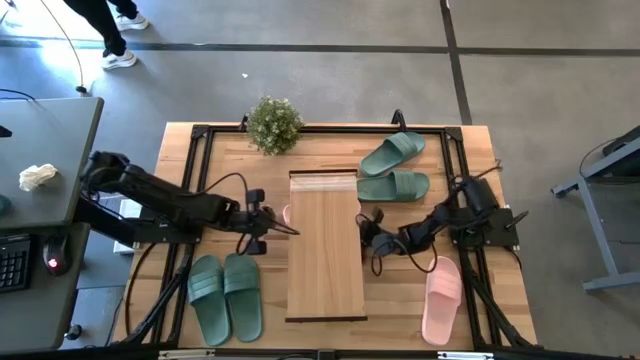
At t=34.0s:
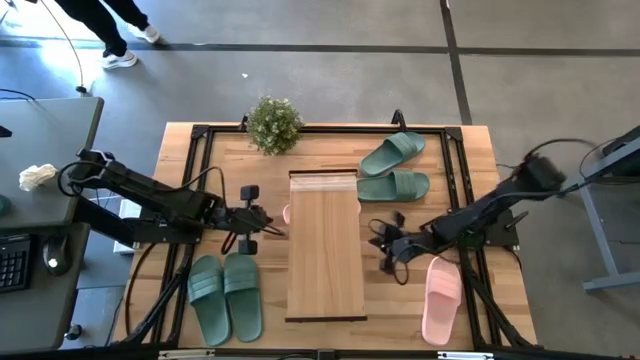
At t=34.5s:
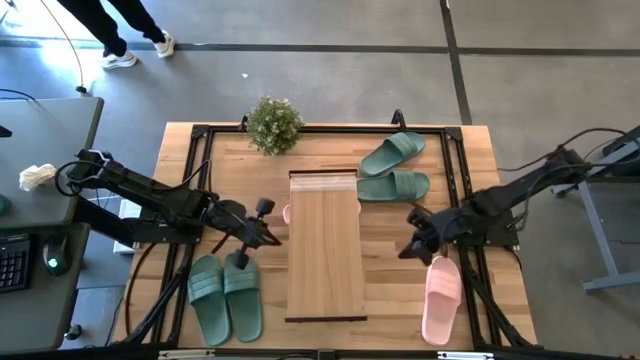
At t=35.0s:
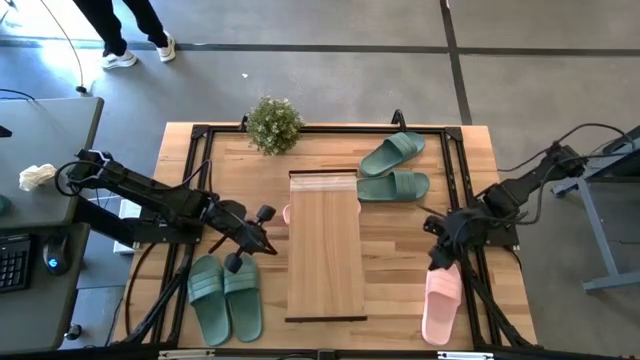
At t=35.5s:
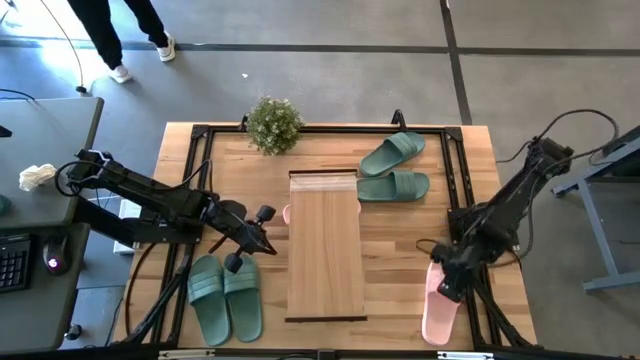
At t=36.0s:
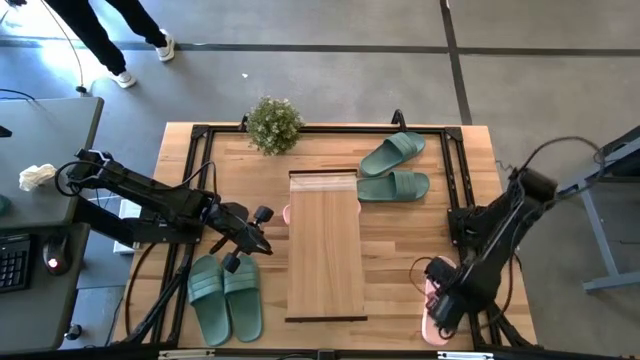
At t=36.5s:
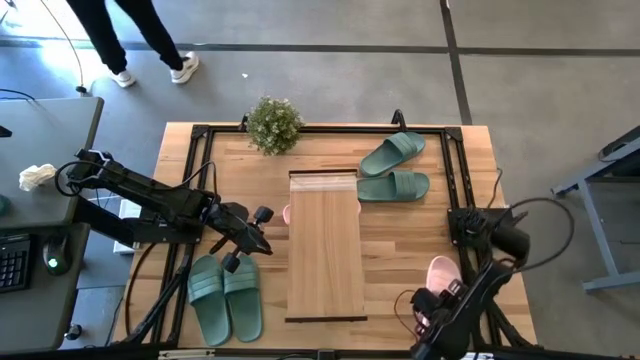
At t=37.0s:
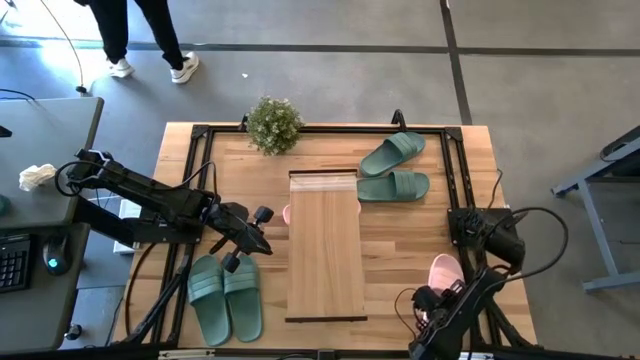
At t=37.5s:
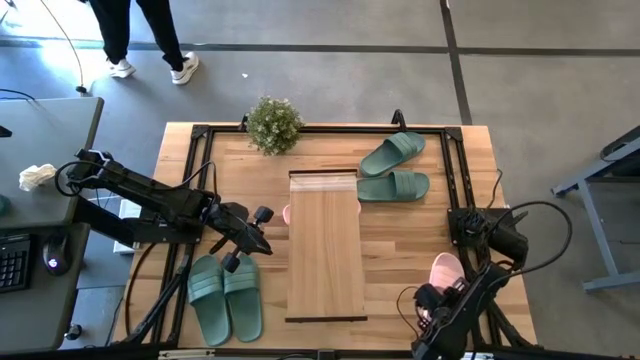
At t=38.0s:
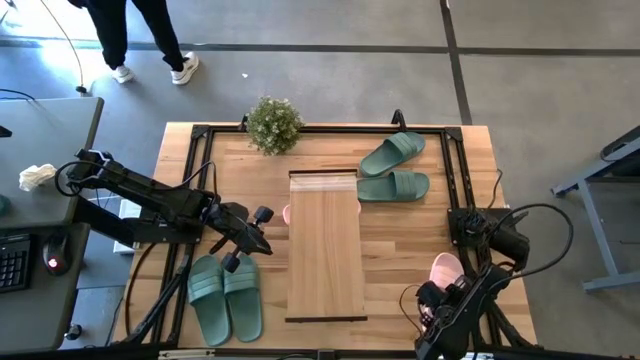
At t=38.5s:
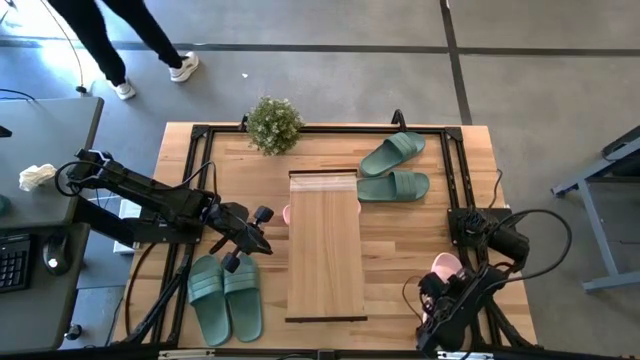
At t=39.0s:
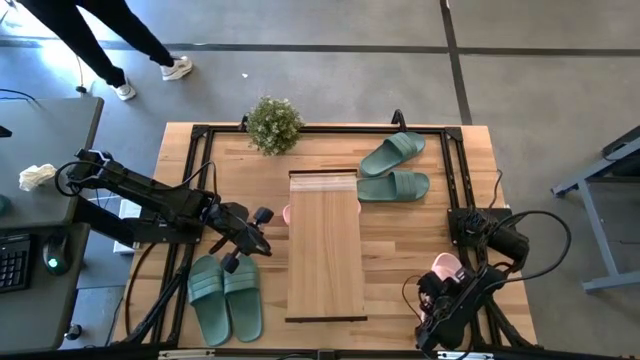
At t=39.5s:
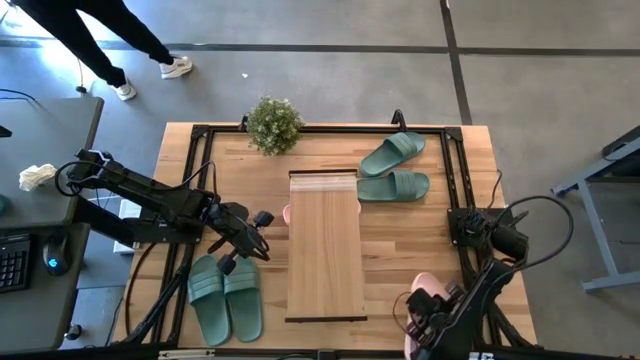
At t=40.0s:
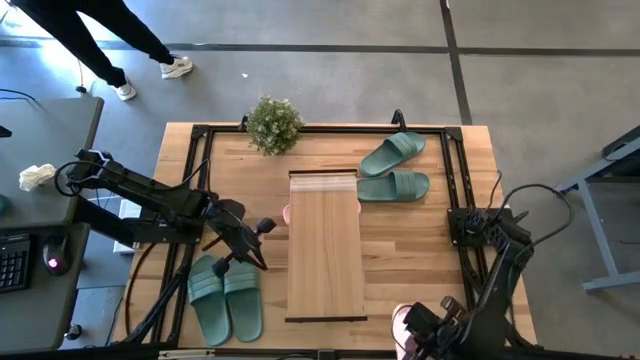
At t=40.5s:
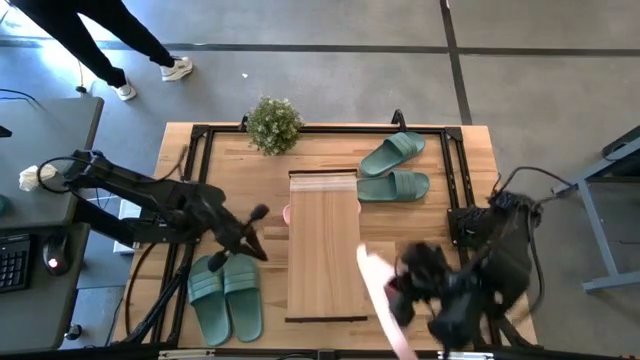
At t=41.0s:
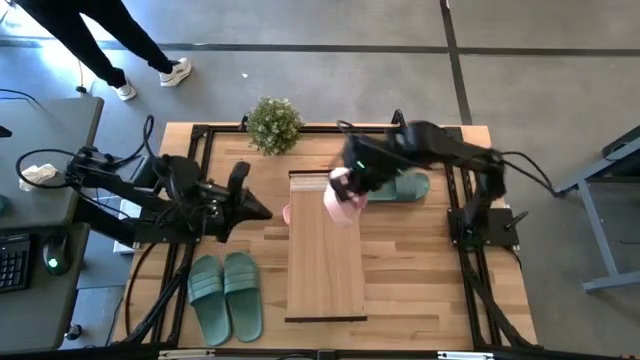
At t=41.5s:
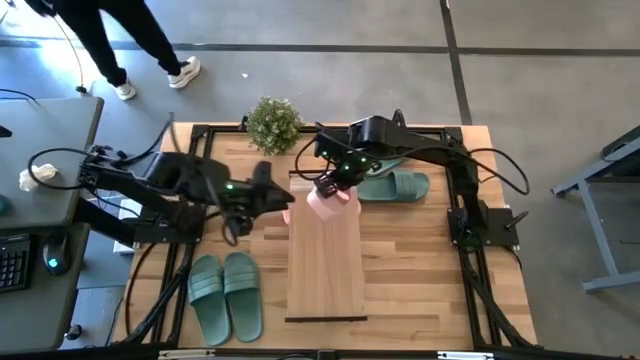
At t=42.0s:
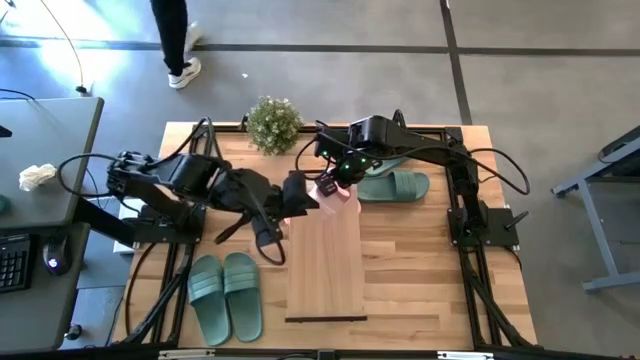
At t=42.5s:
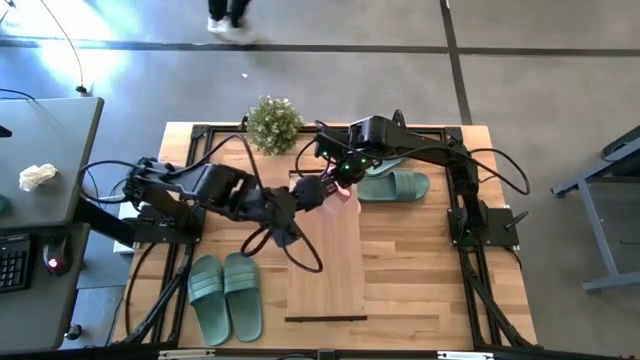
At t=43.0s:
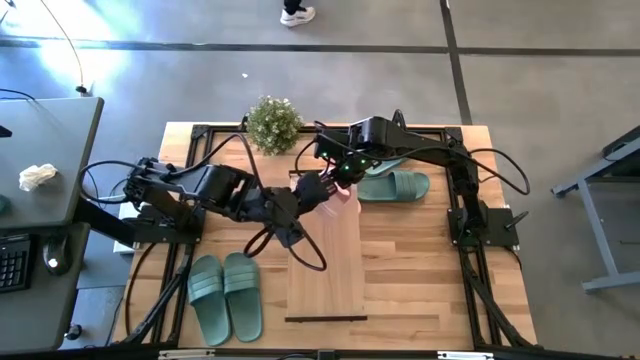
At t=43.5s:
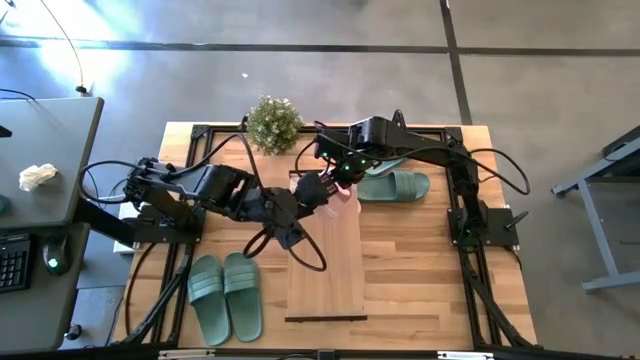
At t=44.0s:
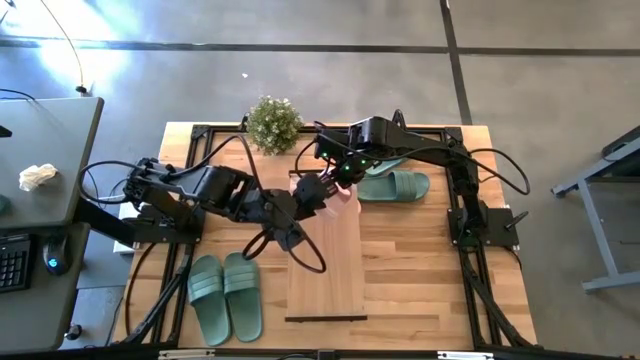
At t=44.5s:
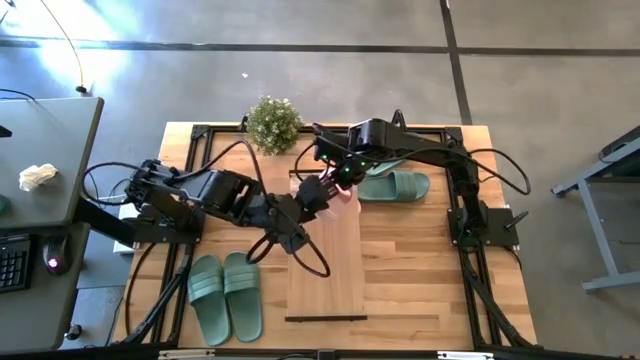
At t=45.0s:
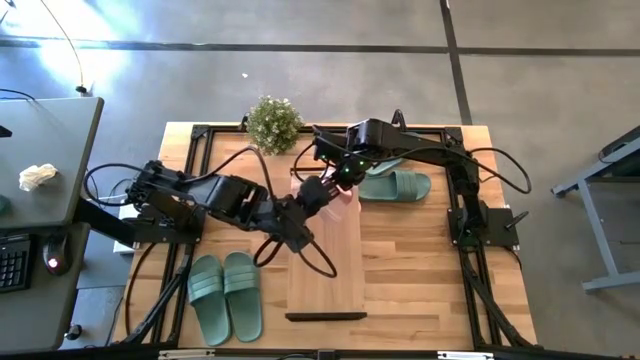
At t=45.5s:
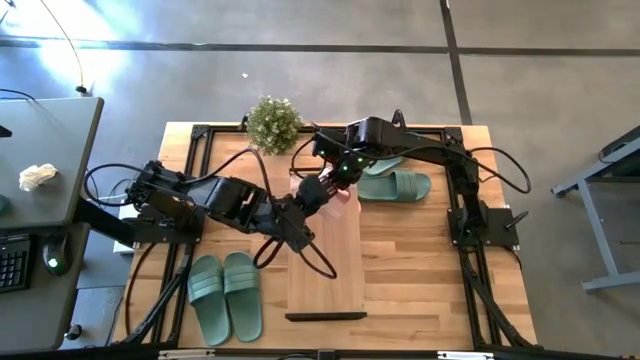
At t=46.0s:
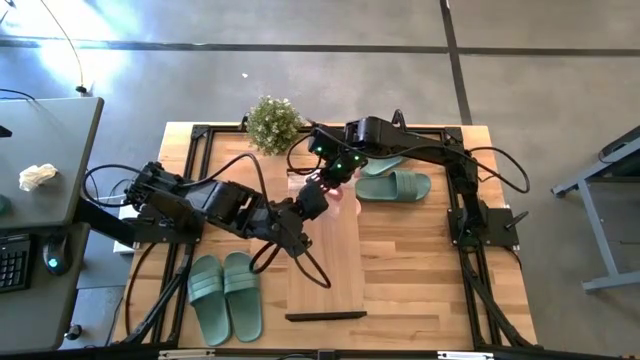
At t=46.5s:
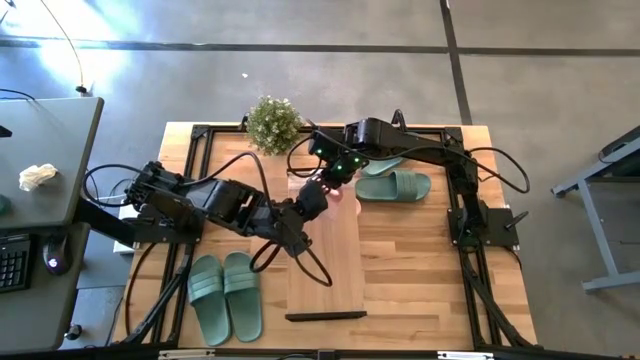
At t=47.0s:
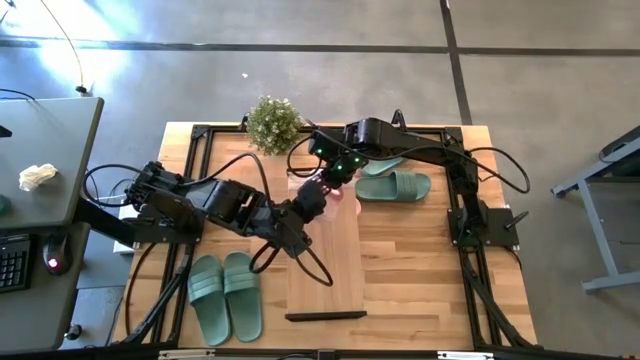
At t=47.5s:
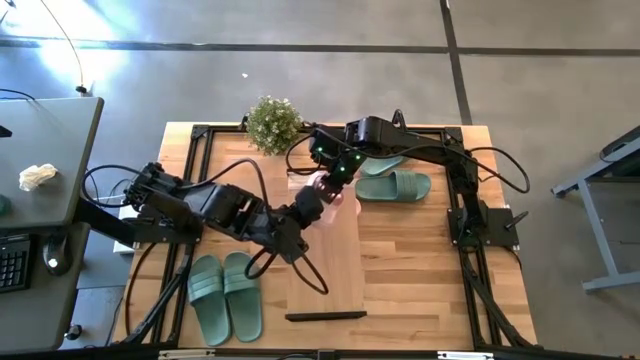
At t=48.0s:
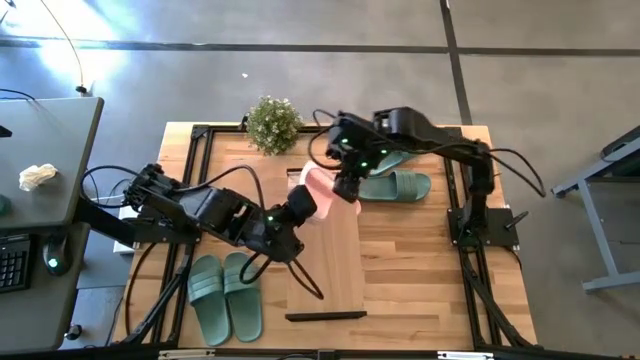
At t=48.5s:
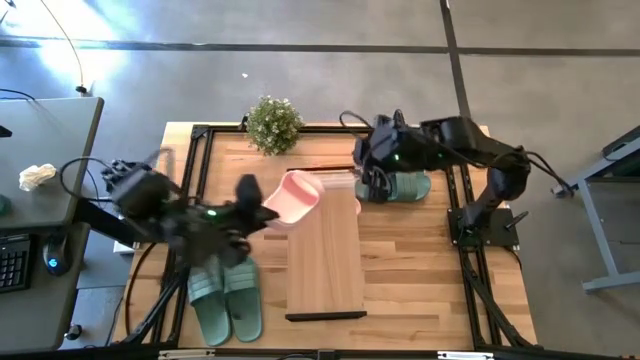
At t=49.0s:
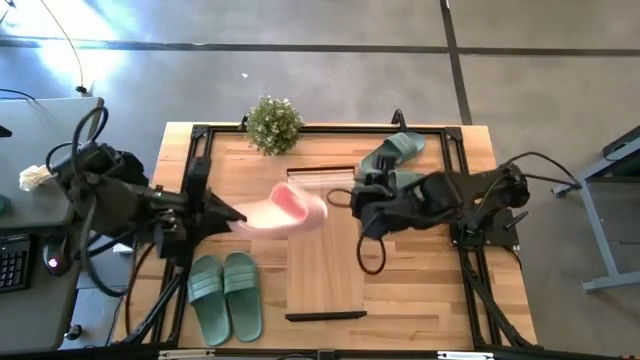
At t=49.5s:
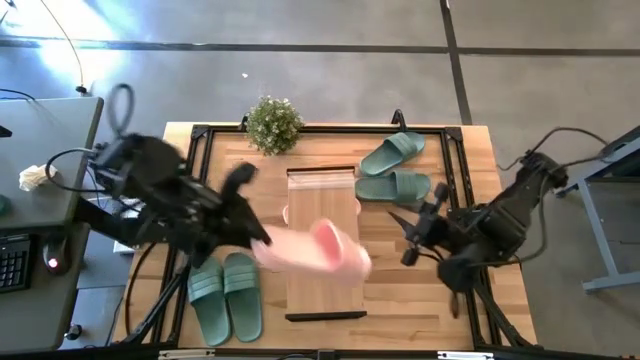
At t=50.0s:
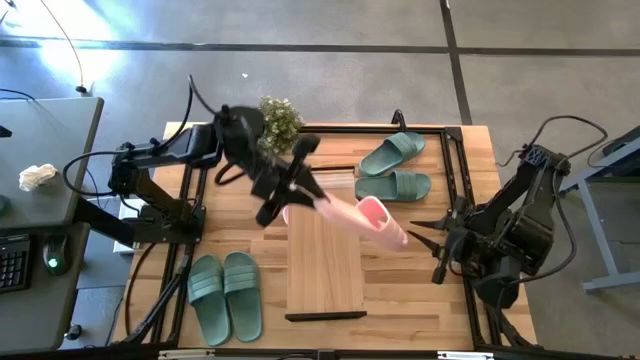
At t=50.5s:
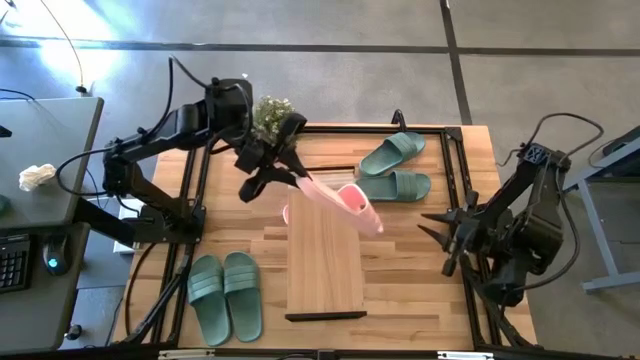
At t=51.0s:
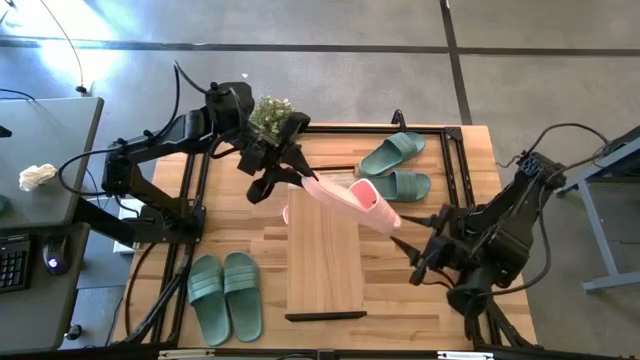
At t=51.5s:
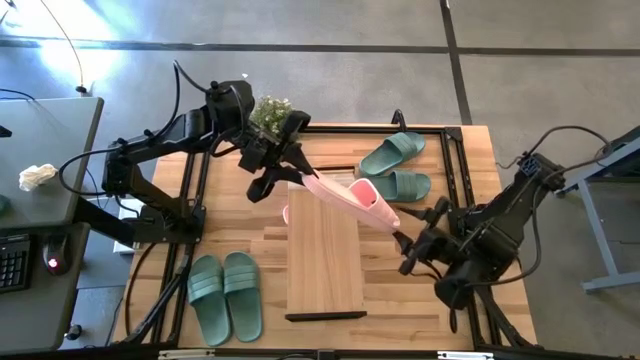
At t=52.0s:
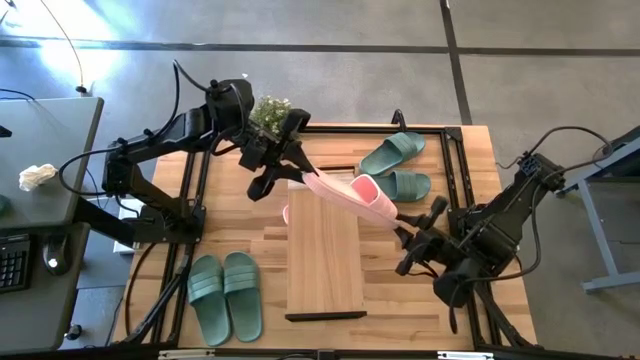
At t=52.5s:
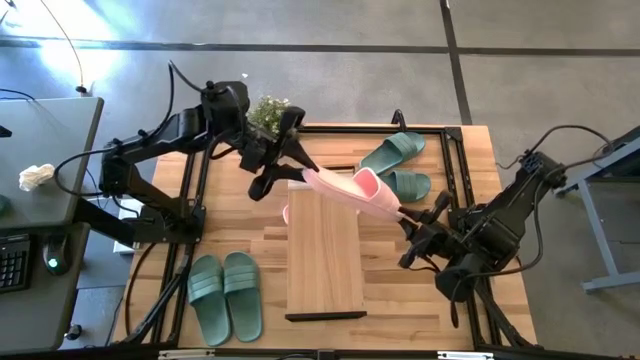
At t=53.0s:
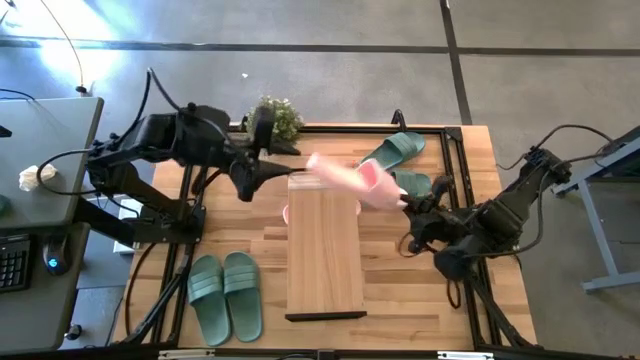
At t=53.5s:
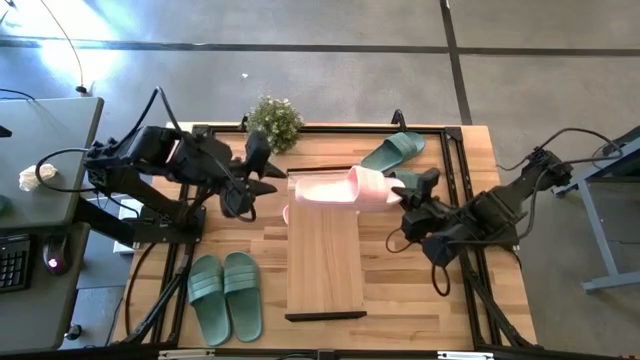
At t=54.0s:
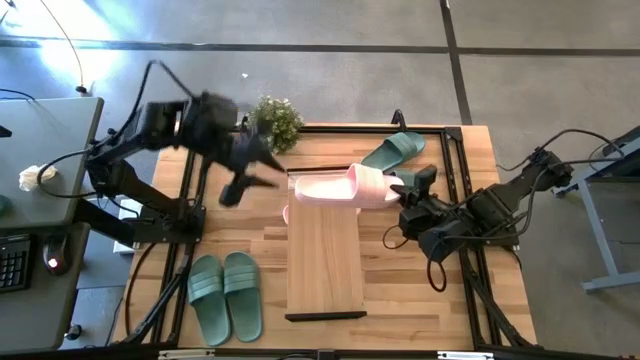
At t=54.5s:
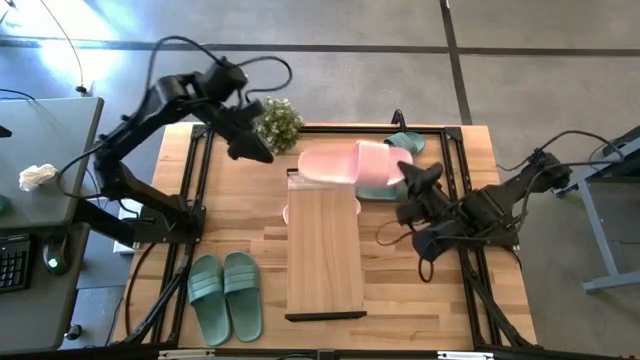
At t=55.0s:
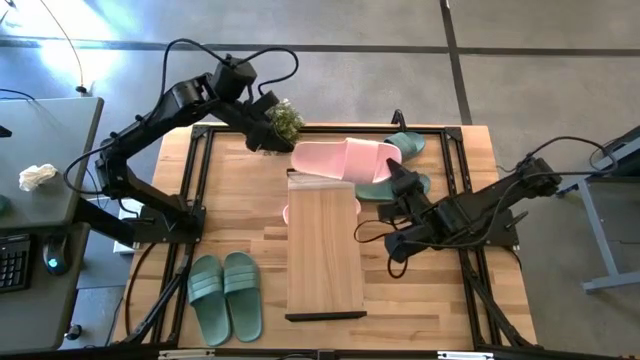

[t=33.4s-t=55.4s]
Task: Pick and place slides into the shelf
Put the pink slide under the shelf aligned with the other pink slide
